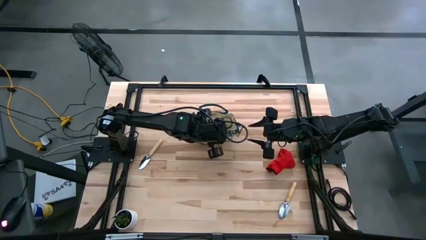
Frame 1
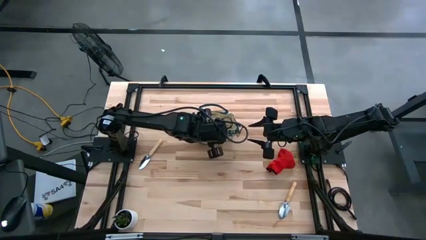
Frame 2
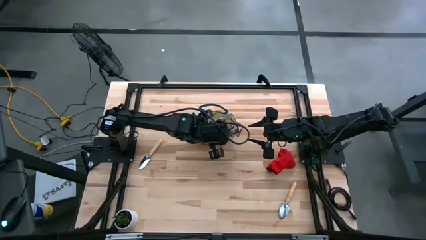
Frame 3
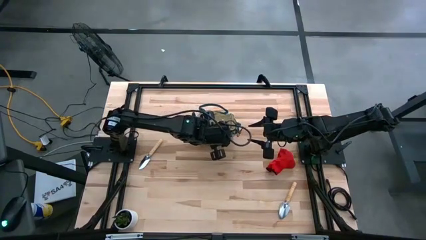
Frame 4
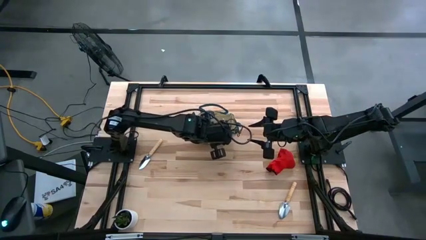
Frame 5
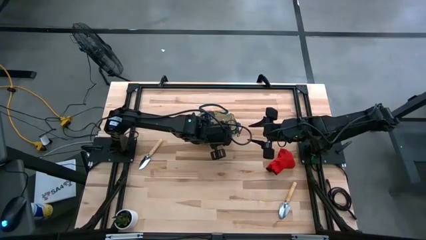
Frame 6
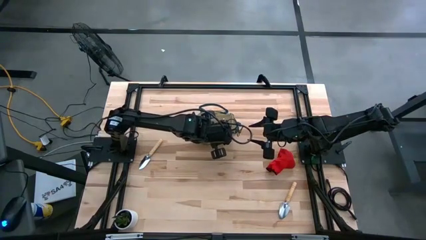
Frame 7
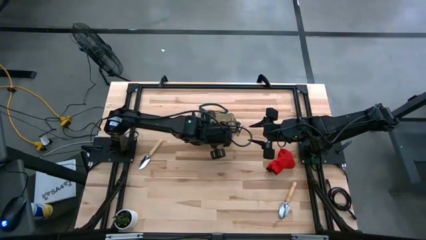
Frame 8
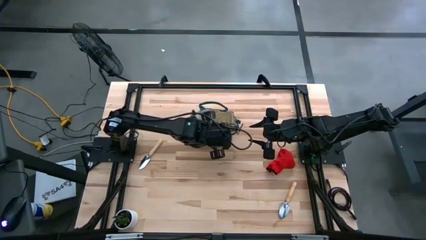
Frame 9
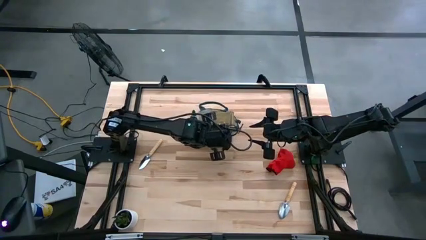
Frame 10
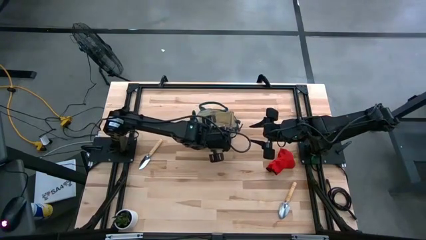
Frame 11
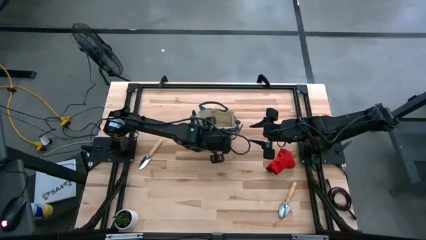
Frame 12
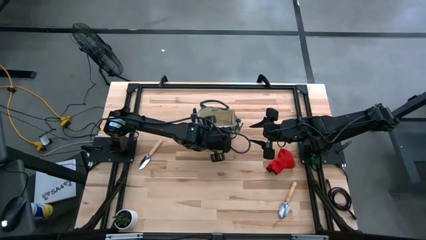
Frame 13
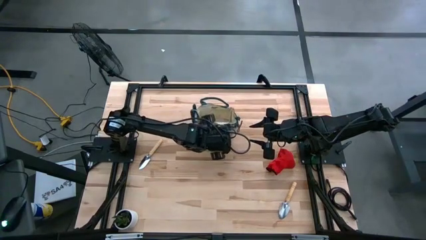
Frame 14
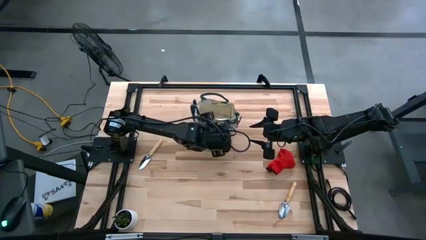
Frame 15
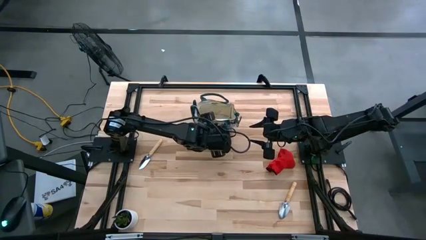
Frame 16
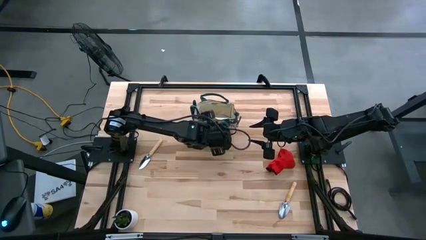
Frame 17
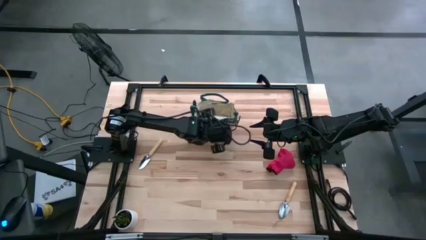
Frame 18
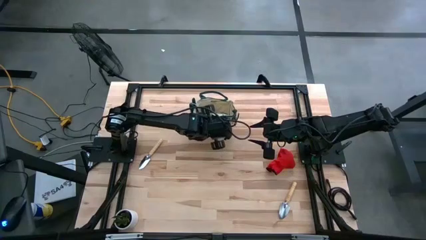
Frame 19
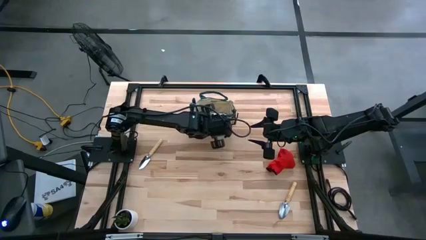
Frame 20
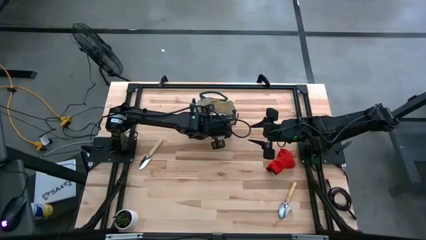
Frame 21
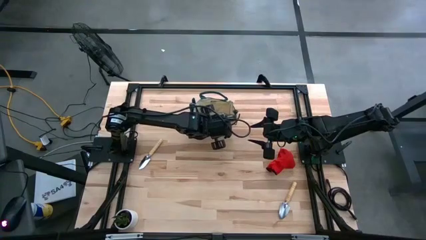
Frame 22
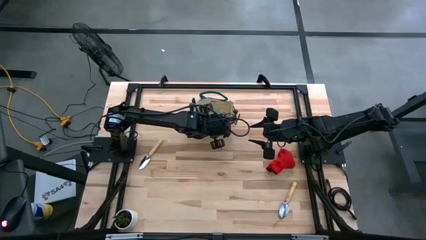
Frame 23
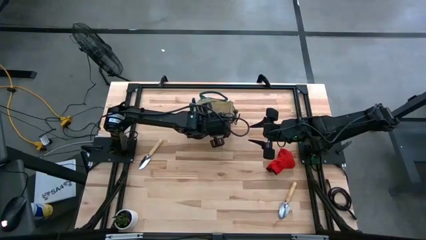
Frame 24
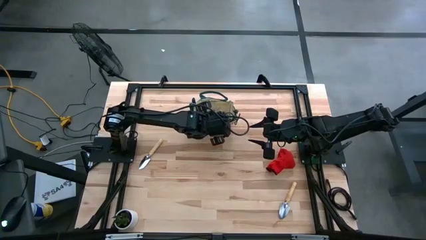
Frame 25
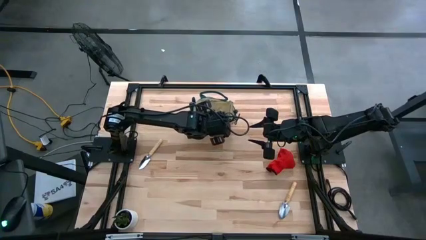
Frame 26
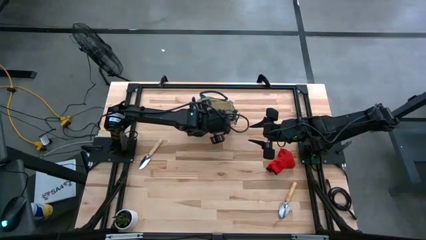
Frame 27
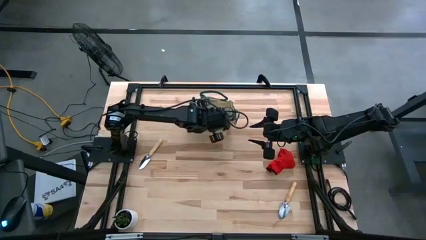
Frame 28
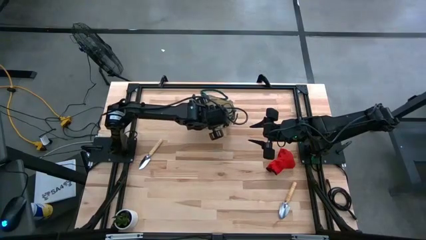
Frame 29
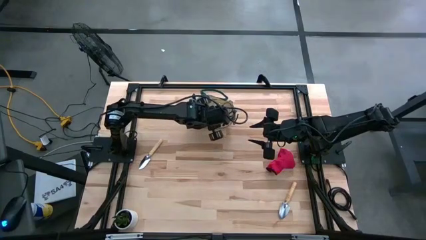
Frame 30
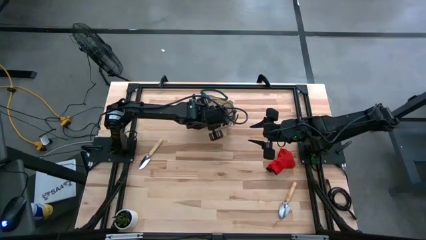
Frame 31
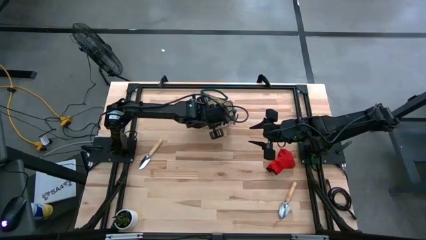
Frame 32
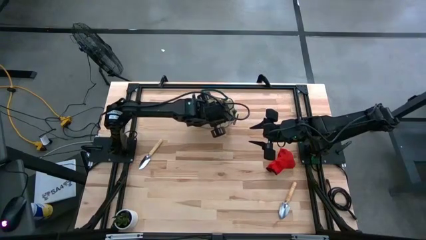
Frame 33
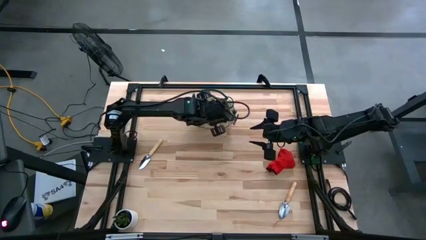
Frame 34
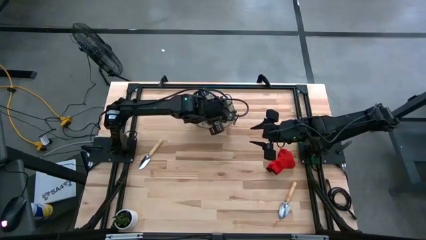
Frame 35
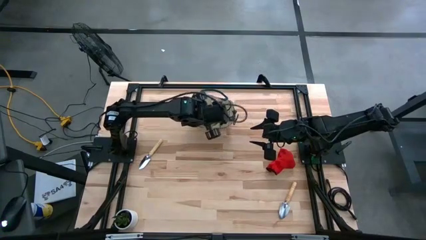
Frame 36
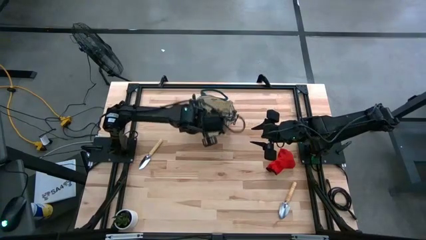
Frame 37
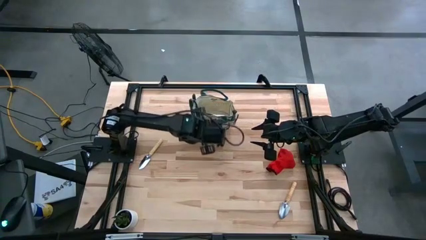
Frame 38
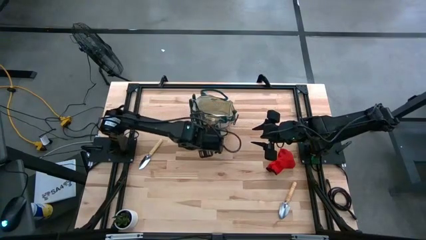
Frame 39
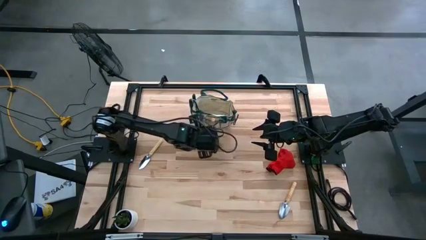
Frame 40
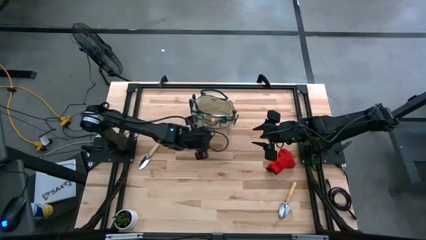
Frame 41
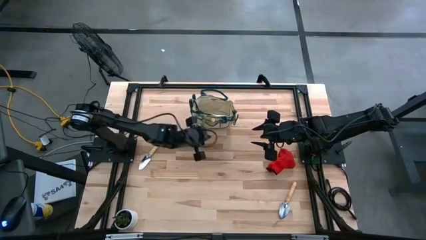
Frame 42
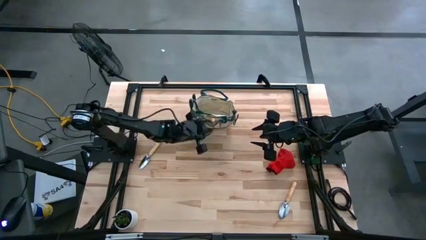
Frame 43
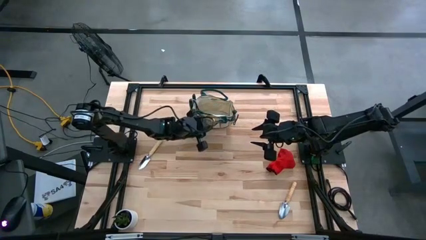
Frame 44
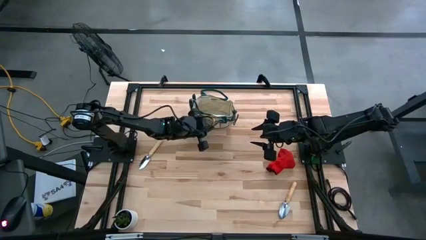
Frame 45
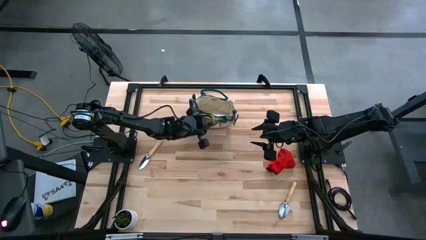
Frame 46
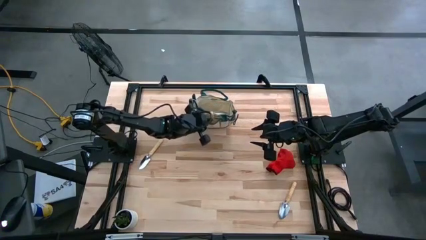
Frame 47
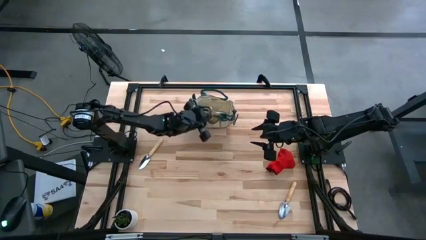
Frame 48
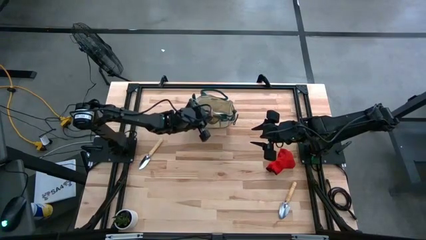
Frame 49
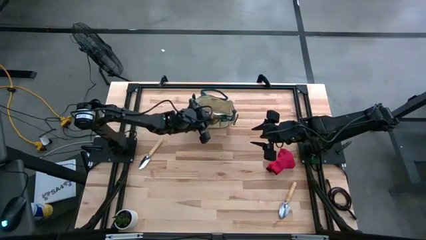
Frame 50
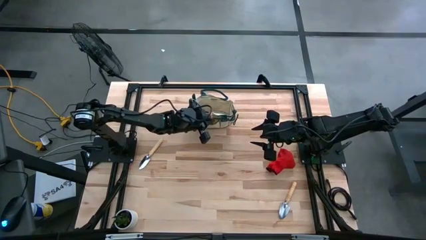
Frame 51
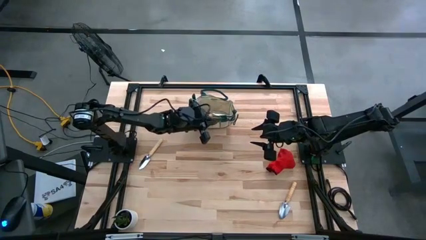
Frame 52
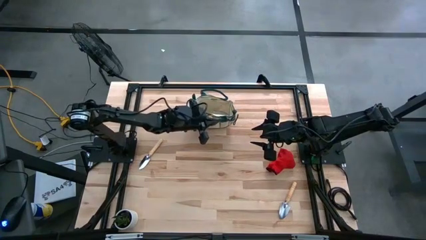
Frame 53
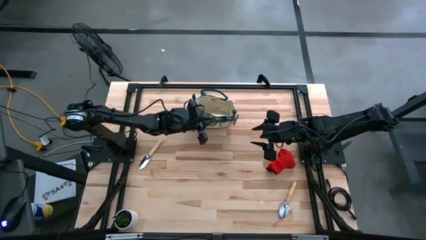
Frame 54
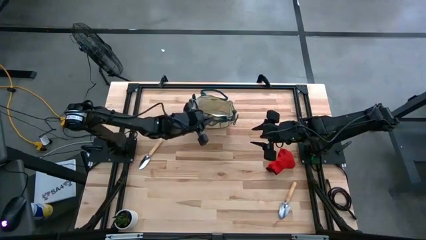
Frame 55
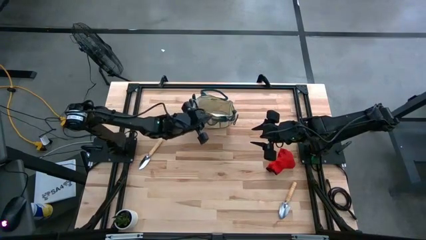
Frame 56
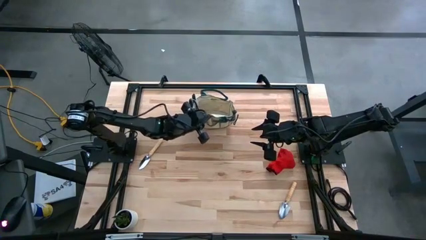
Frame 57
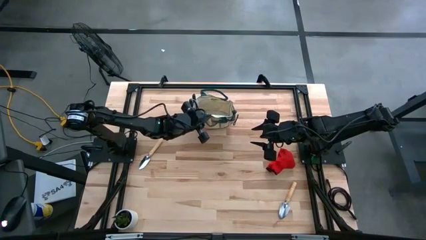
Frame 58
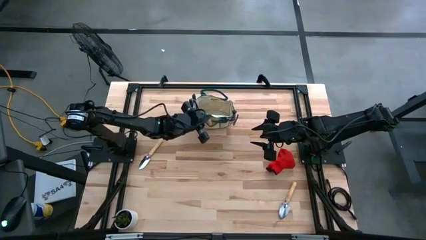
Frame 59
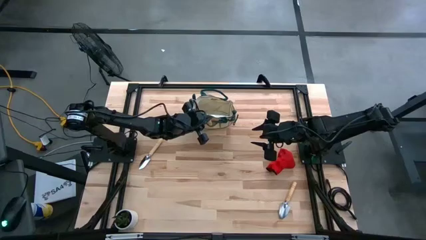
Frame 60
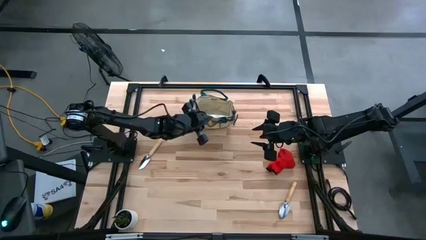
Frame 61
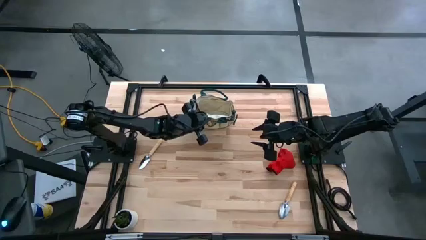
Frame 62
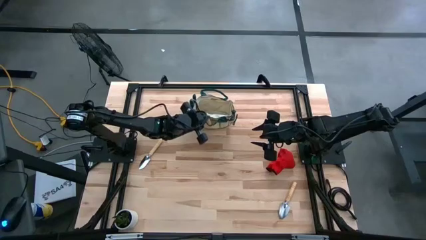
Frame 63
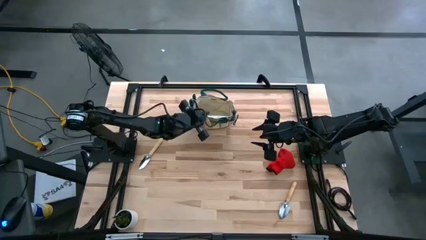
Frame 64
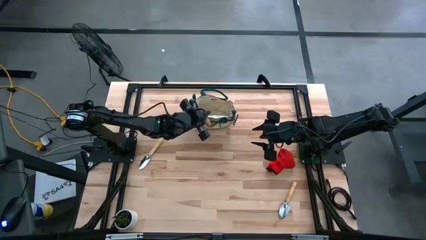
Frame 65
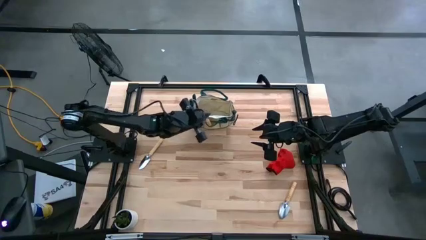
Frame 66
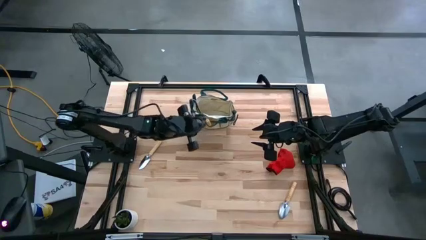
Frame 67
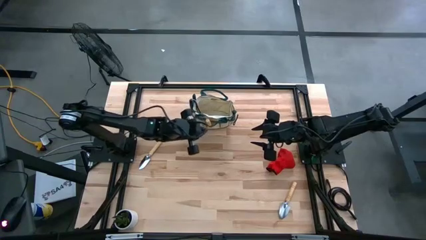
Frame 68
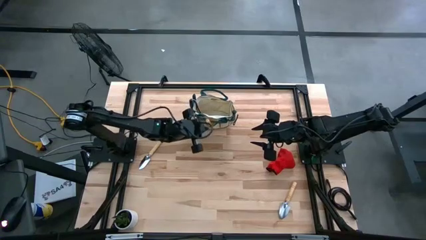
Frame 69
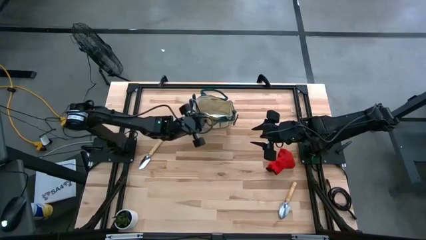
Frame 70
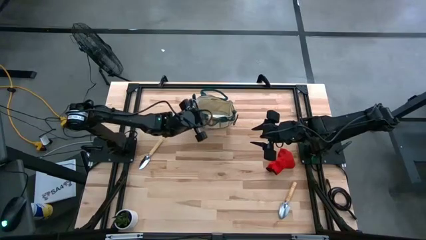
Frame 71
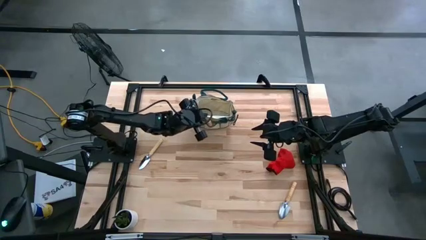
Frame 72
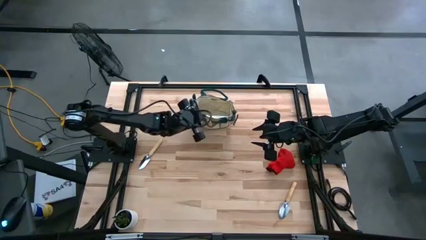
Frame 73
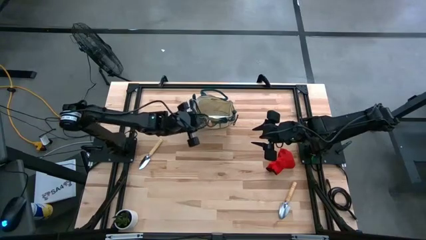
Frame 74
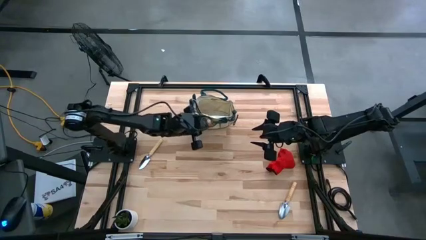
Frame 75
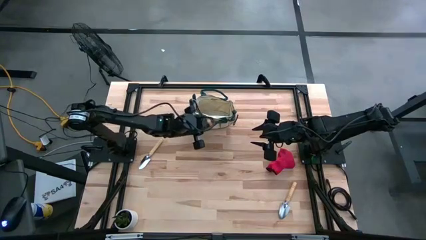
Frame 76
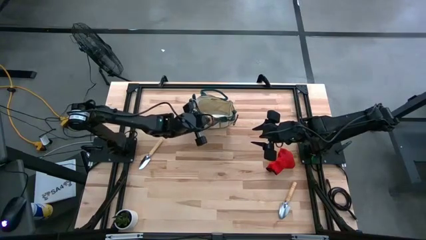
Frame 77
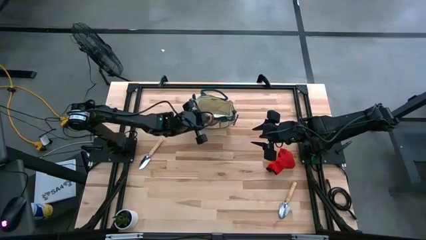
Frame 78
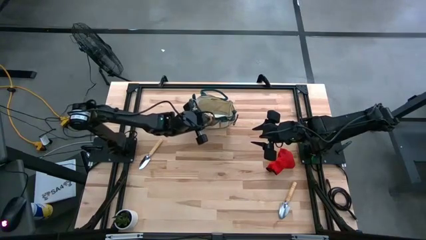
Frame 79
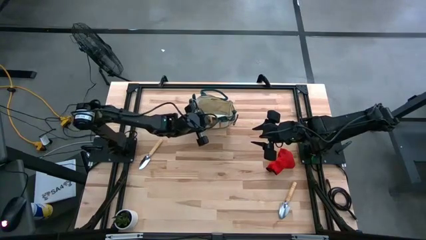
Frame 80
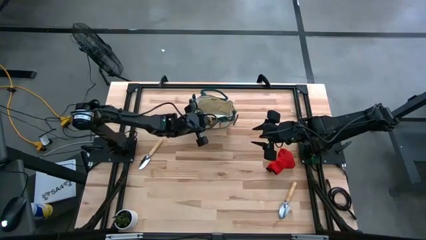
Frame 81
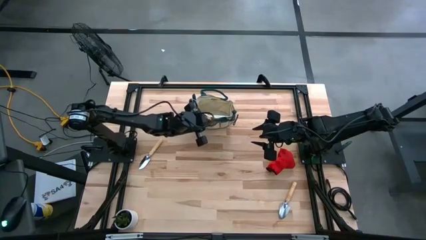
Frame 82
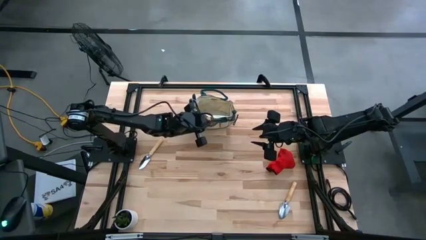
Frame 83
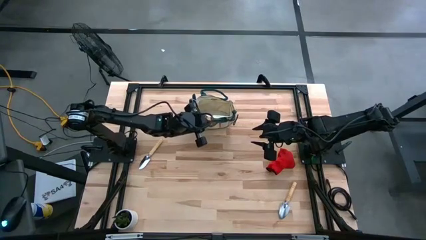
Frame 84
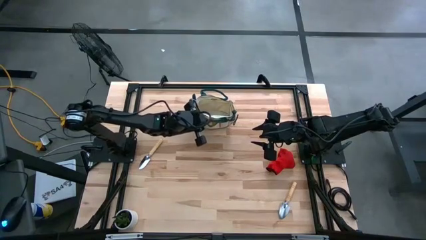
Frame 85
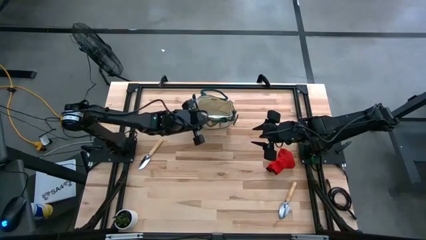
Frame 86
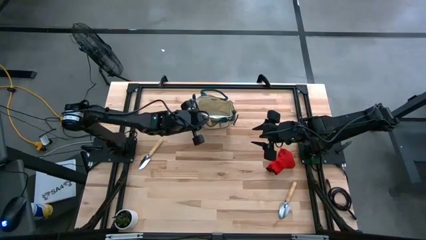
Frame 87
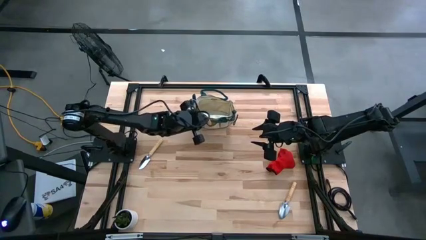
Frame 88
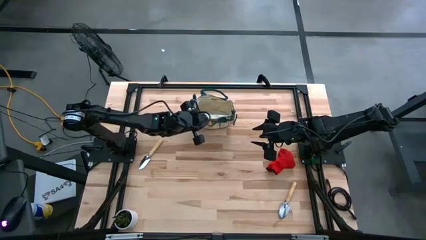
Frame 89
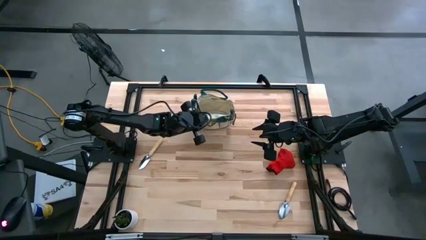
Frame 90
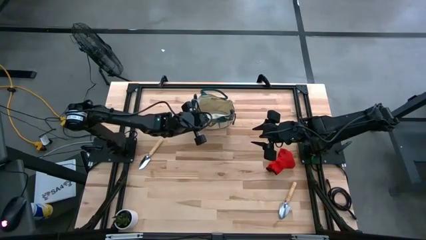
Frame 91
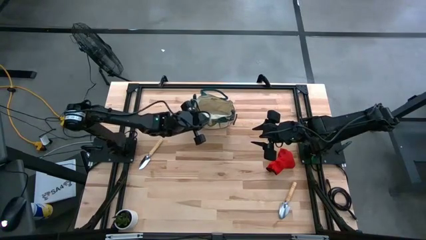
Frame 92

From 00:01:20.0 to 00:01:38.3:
Task: Pick & Place Garden tools in Gardening bag
Put the hand rake into the gardening bag
